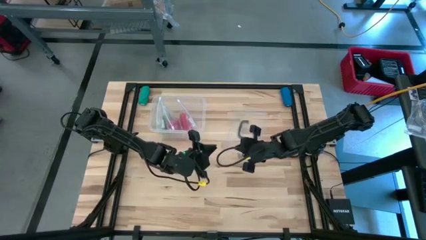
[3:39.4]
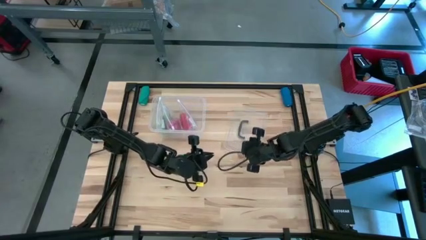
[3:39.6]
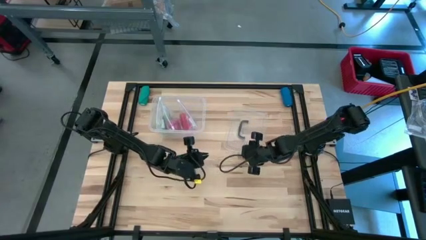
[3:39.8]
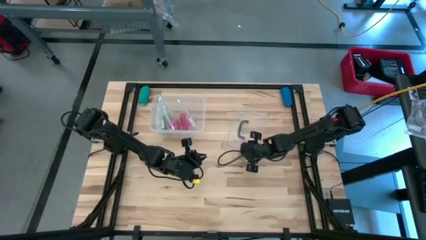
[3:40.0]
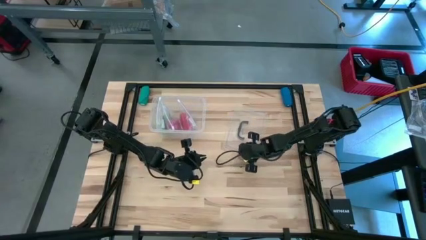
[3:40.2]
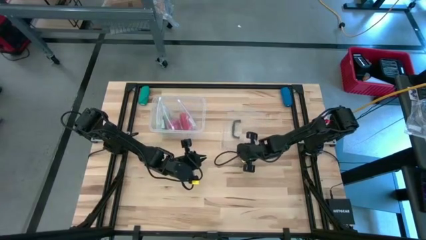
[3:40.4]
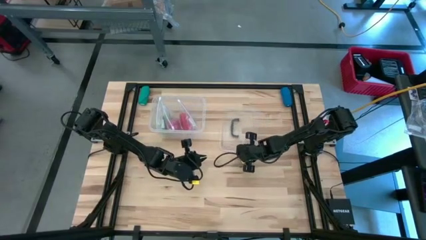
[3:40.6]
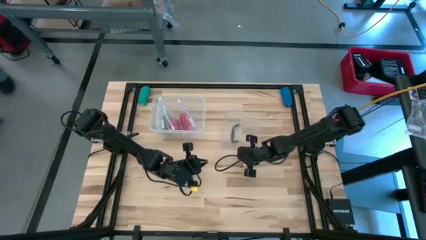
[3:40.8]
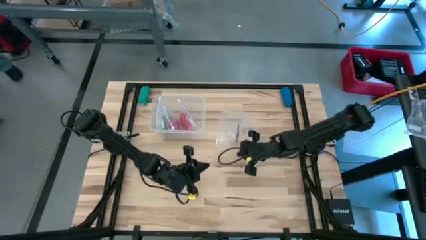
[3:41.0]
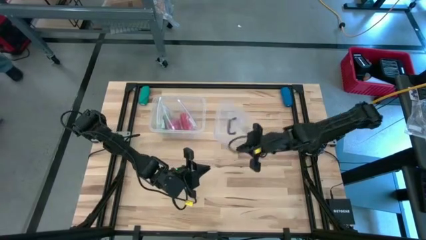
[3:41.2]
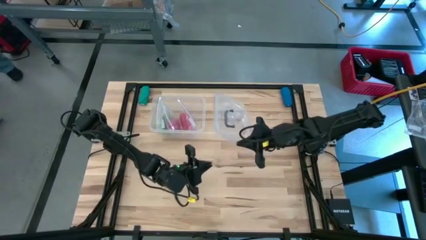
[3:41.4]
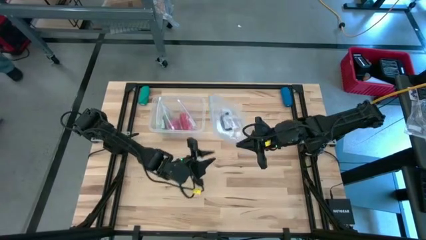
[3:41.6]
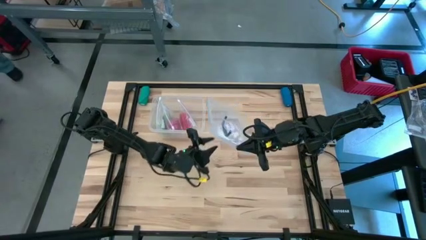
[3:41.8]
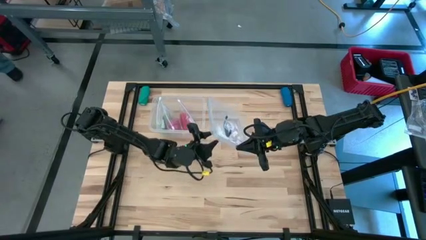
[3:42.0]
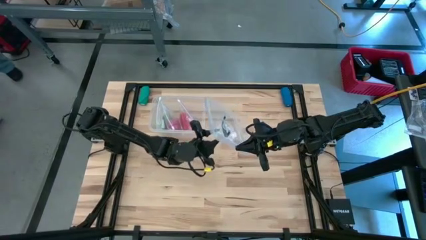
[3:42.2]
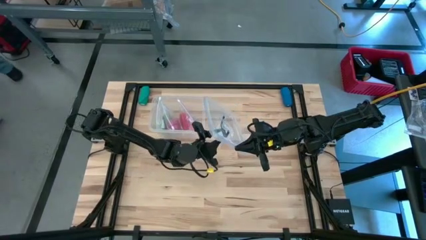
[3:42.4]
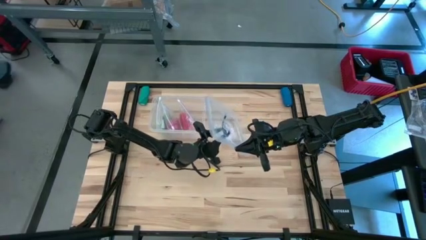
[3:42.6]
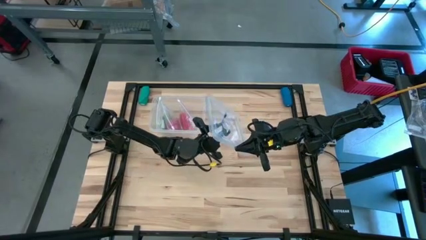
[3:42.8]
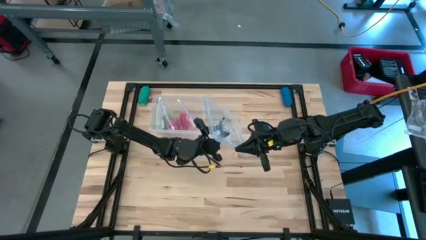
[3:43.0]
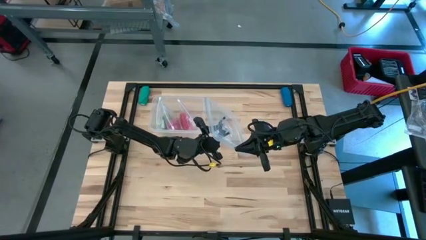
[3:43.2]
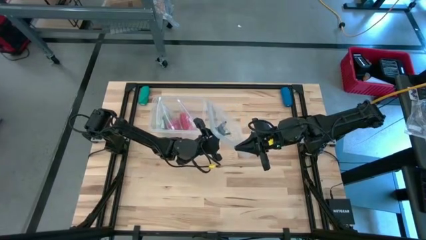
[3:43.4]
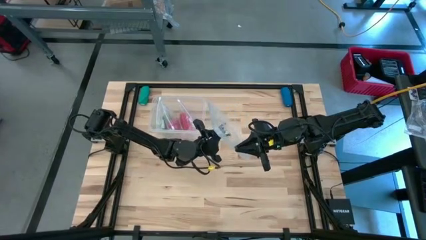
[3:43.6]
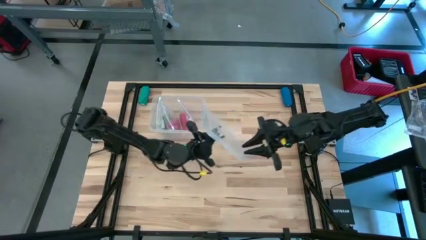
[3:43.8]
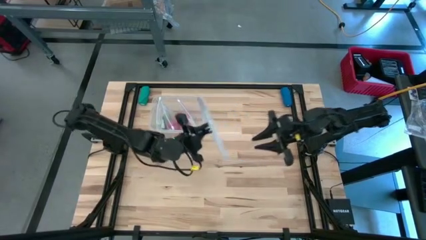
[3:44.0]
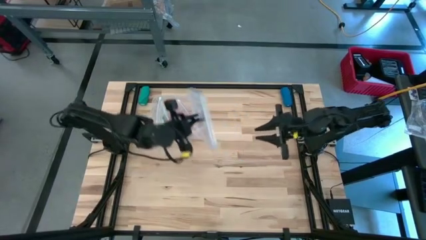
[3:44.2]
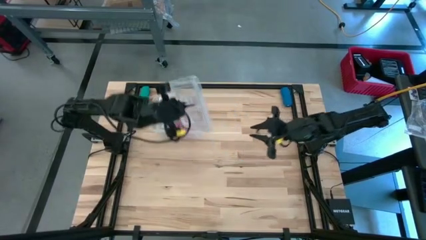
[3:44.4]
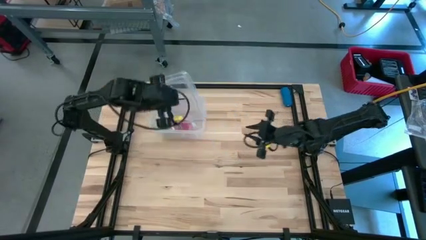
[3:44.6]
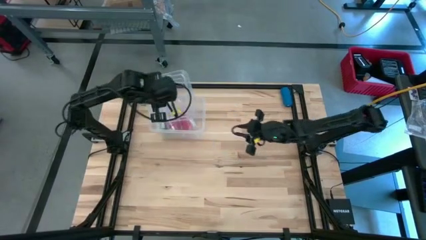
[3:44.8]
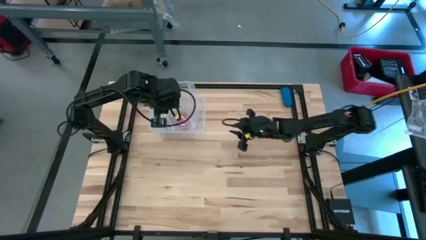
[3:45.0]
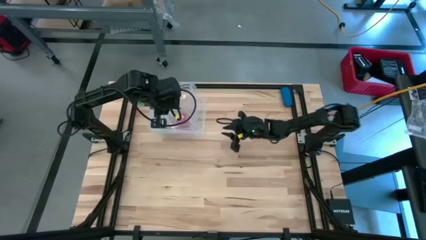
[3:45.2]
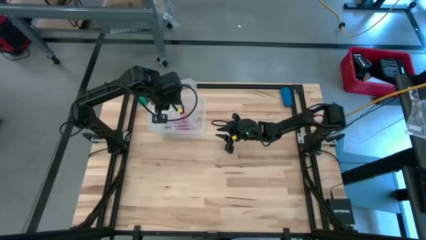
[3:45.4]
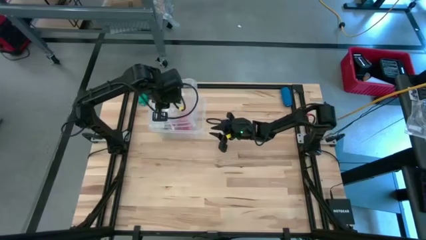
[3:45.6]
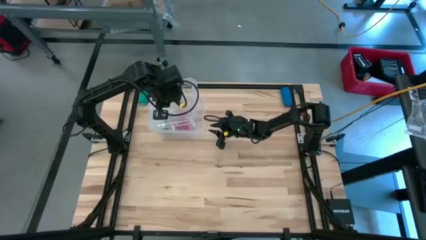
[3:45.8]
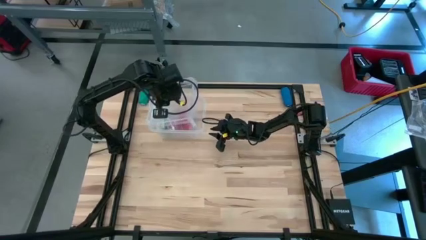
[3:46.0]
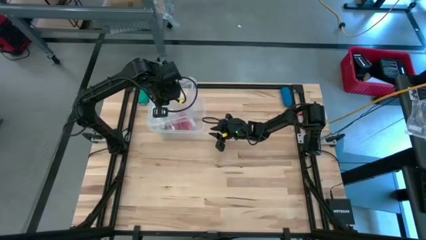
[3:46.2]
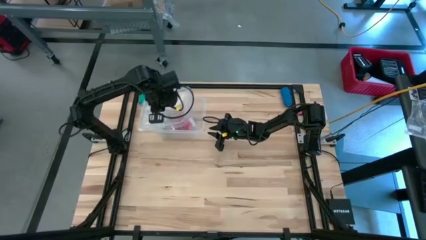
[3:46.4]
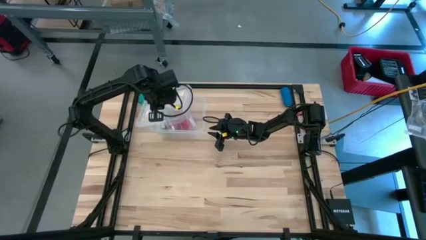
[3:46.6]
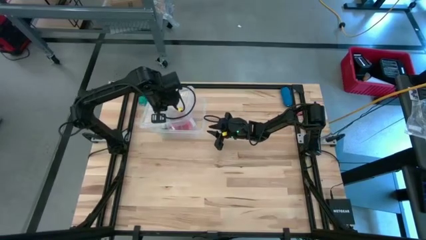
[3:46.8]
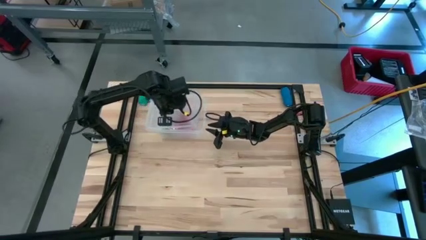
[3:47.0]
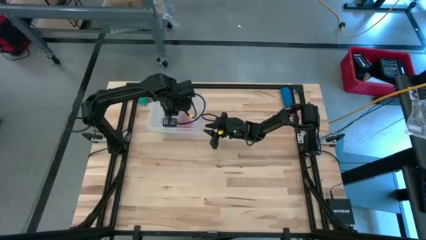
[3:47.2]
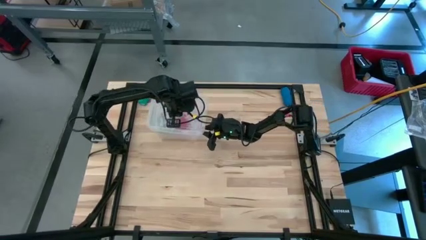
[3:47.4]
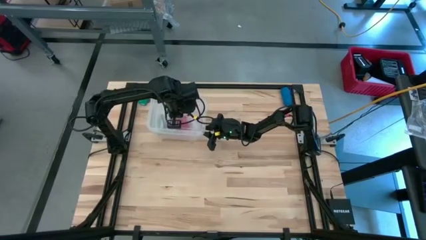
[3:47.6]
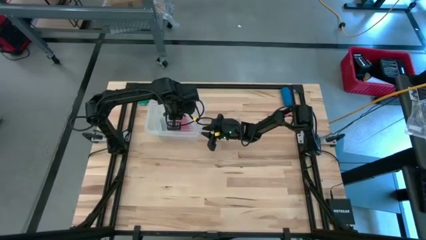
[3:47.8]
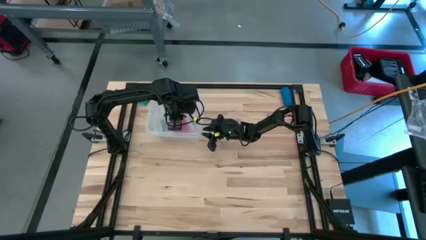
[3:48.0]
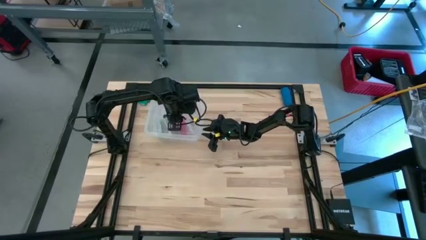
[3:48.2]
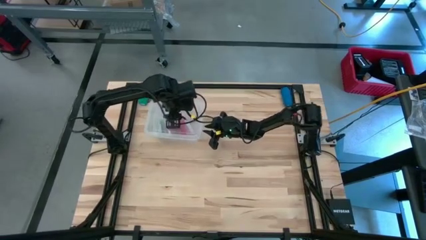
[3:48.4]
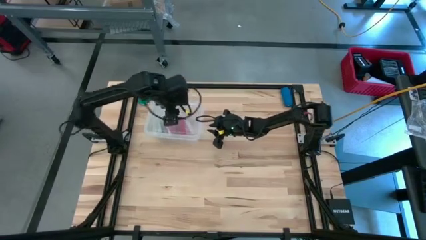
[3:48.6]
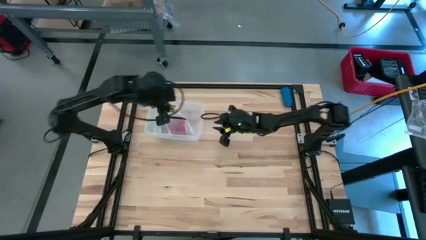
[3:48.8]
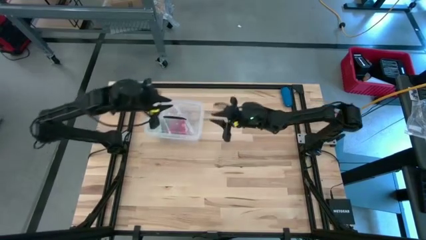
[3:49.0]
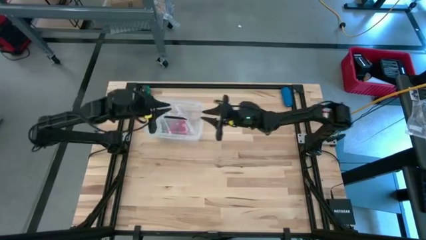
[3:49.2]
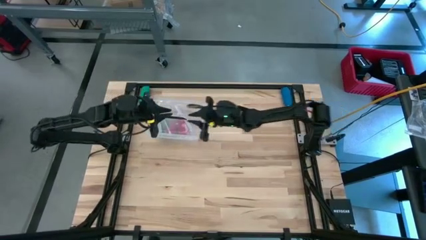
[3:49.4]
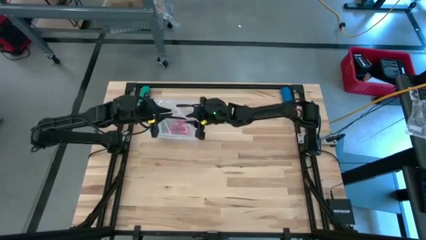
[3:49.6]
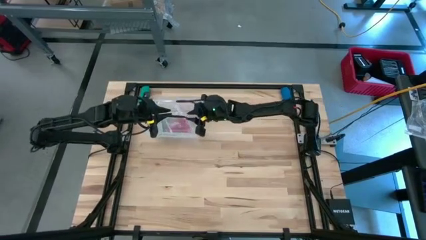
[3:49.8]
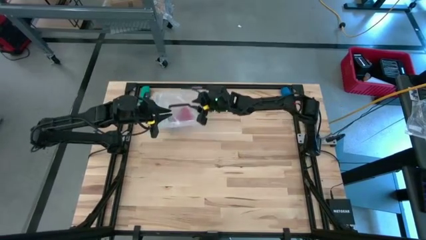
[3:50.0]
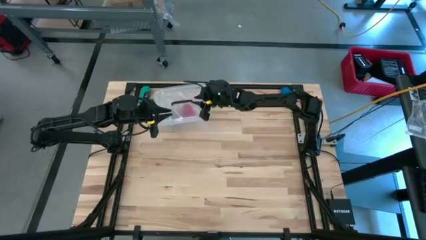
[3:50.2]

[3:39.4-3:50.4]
Task: Roll bandage
Close the transparent container
